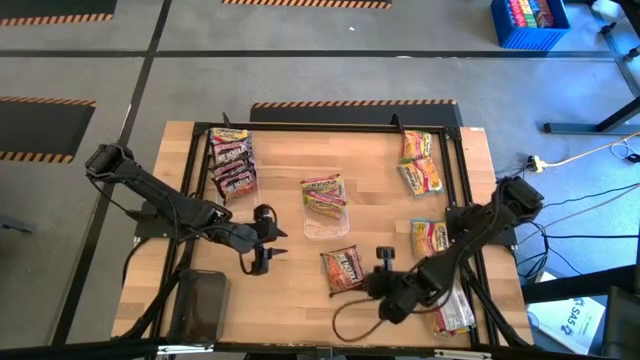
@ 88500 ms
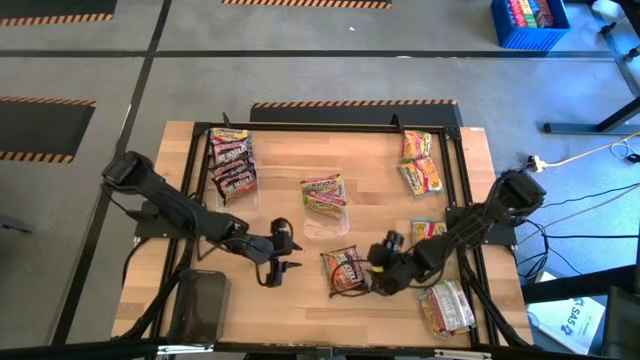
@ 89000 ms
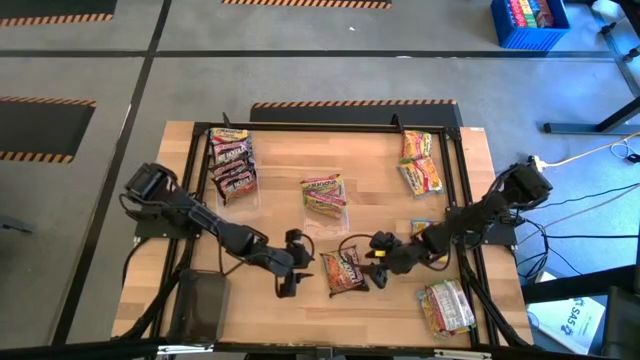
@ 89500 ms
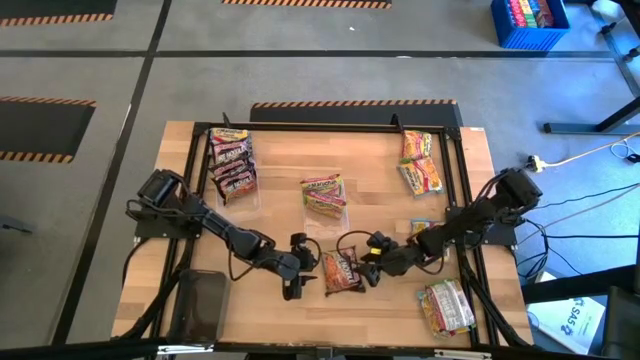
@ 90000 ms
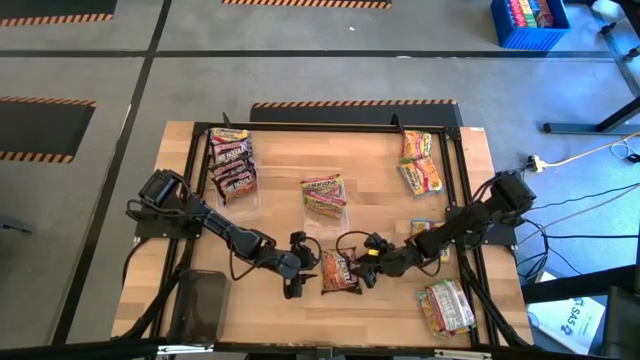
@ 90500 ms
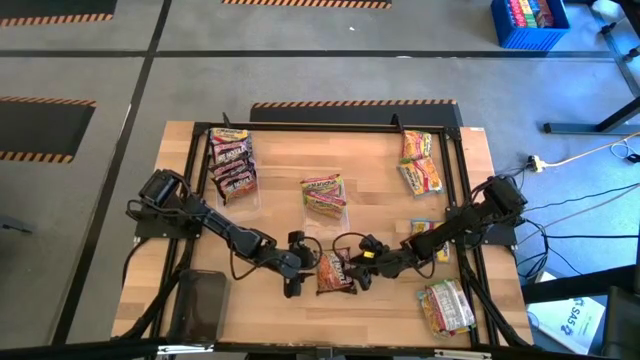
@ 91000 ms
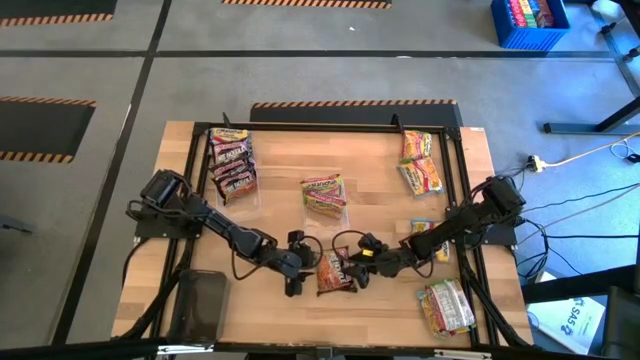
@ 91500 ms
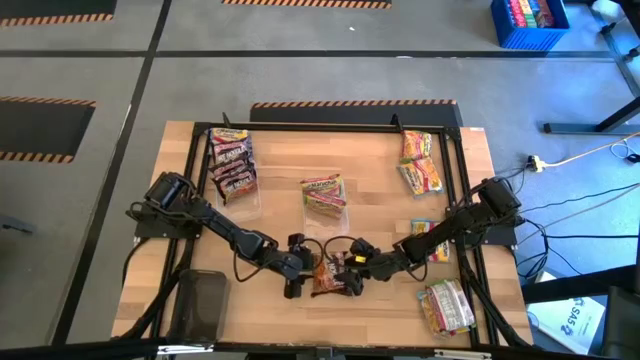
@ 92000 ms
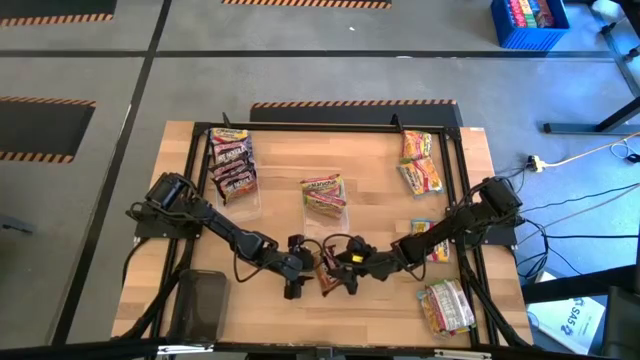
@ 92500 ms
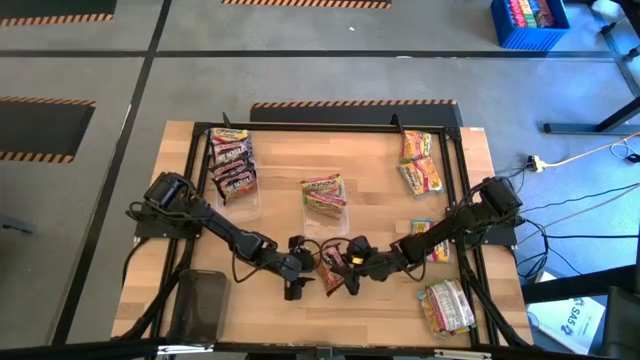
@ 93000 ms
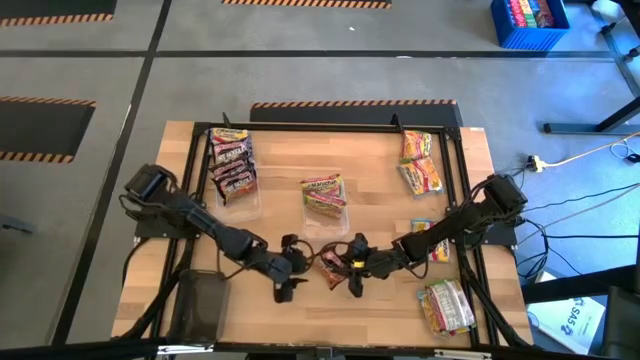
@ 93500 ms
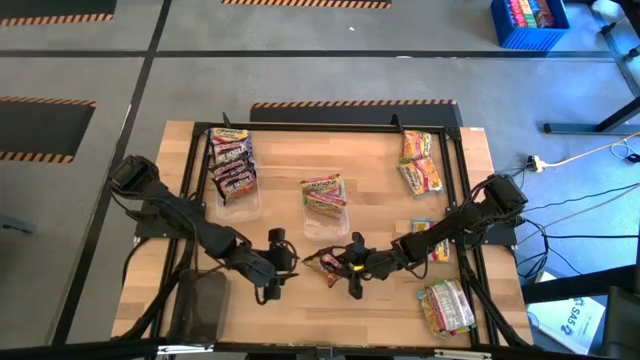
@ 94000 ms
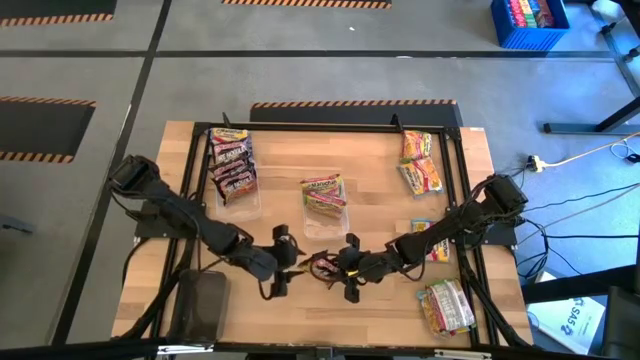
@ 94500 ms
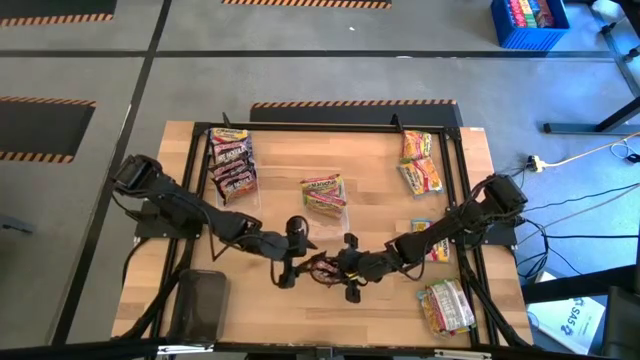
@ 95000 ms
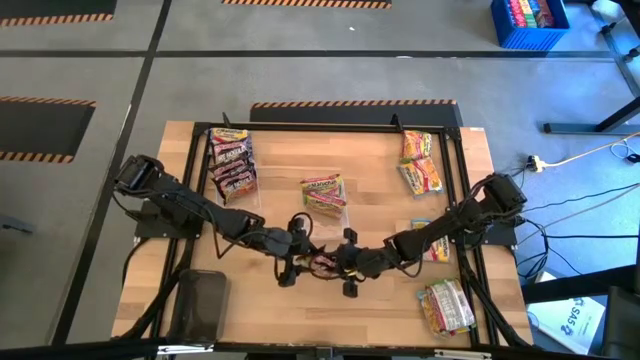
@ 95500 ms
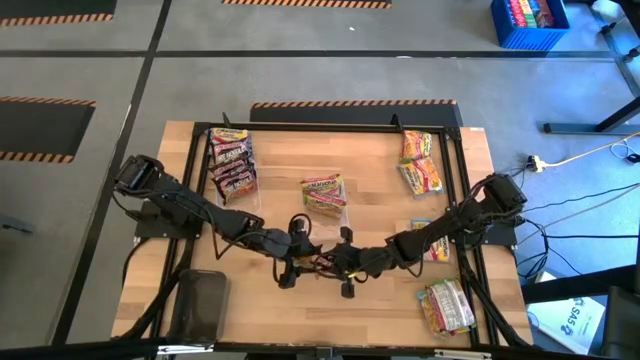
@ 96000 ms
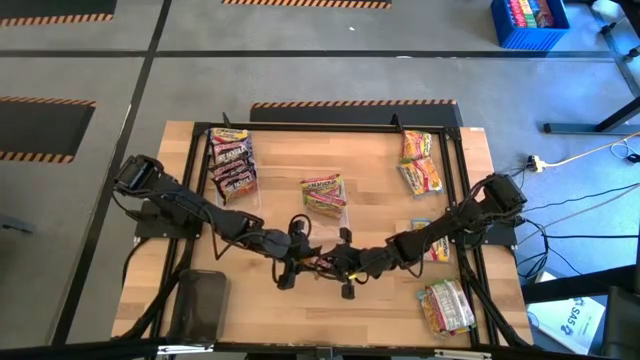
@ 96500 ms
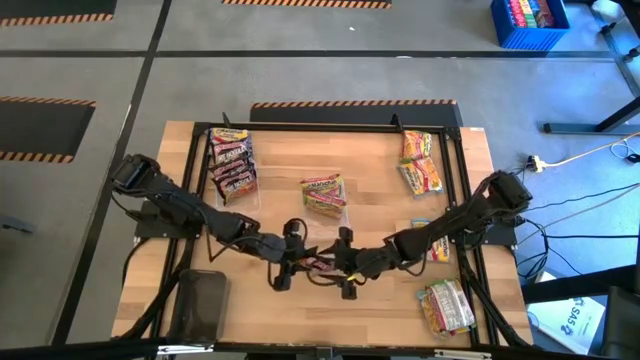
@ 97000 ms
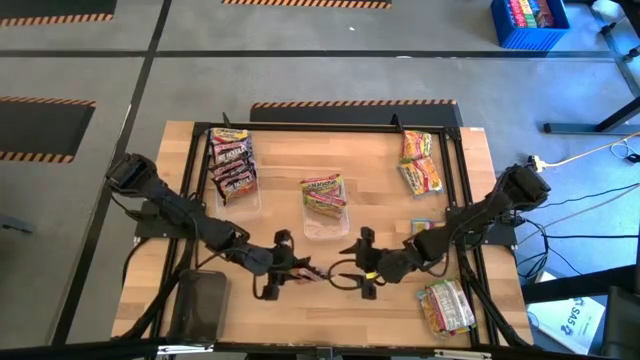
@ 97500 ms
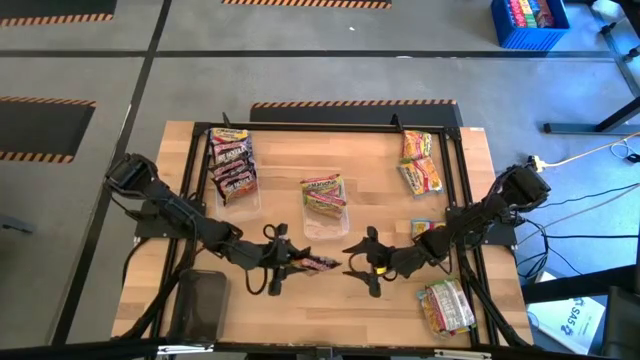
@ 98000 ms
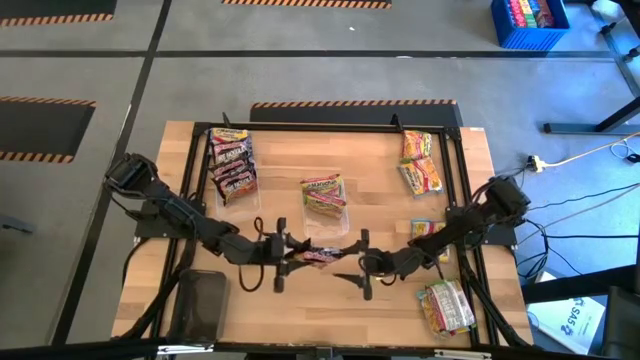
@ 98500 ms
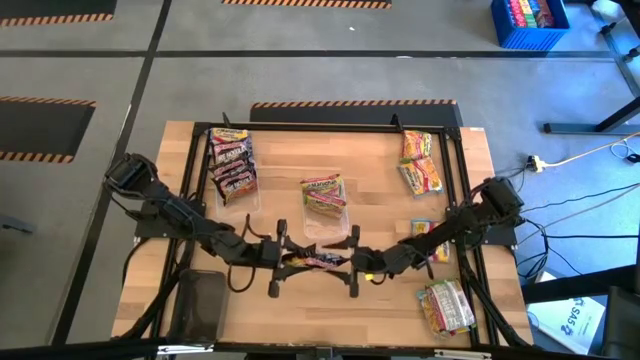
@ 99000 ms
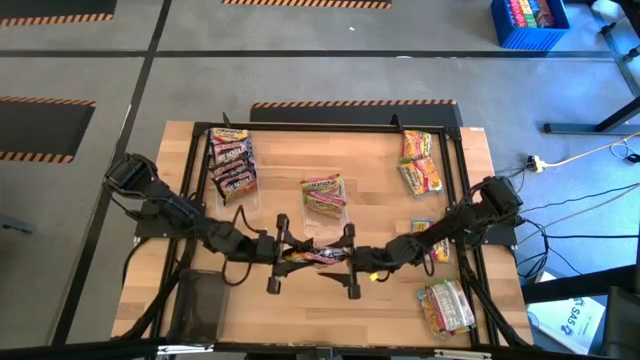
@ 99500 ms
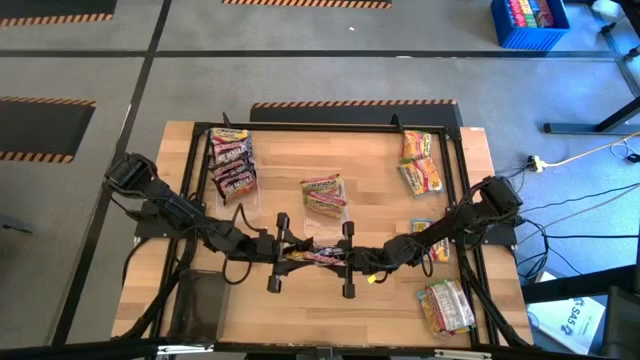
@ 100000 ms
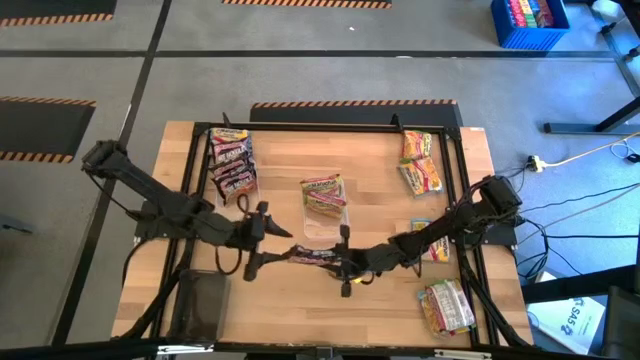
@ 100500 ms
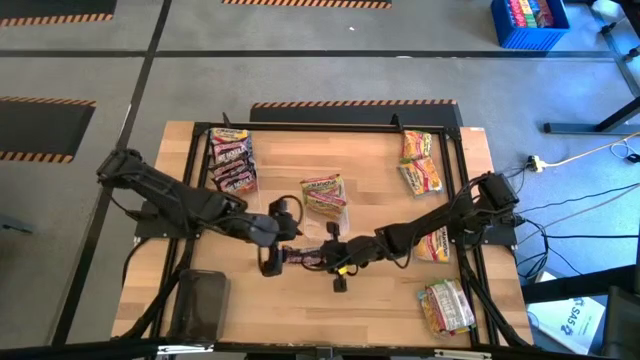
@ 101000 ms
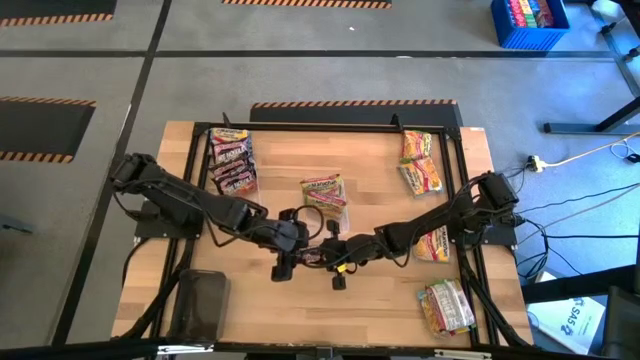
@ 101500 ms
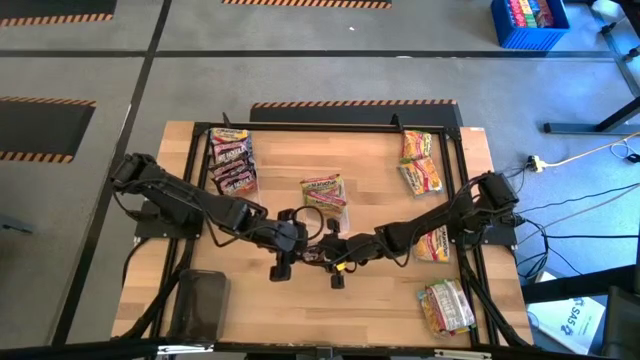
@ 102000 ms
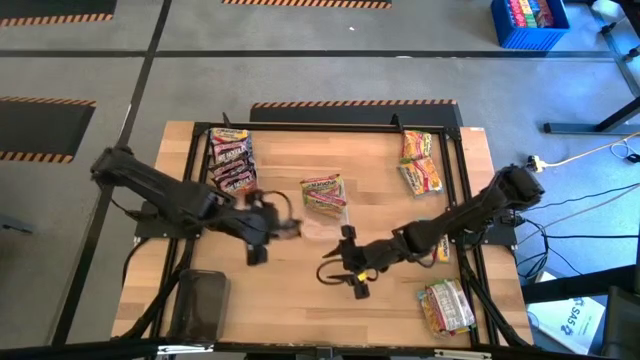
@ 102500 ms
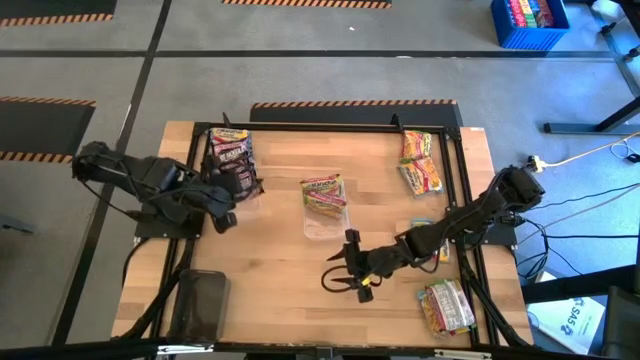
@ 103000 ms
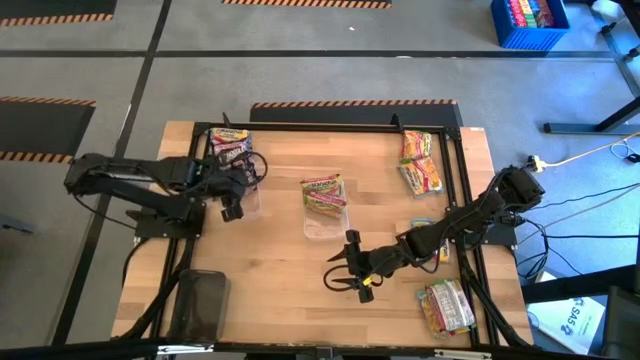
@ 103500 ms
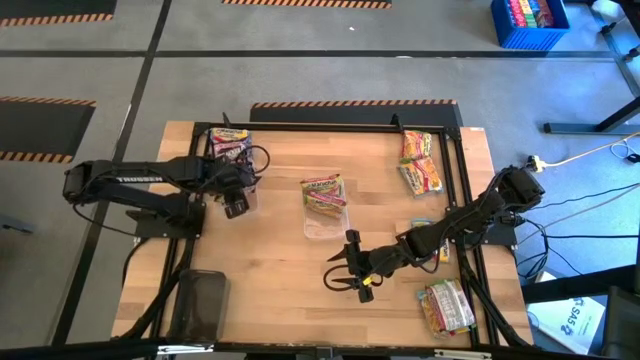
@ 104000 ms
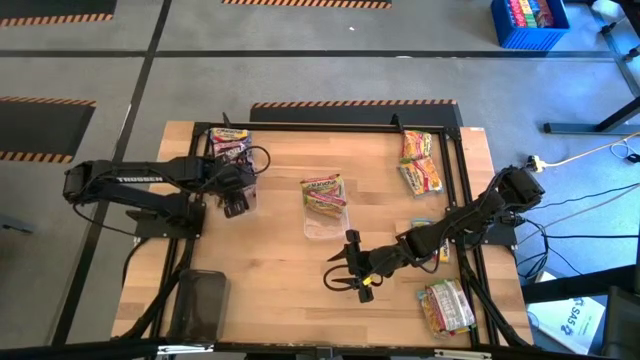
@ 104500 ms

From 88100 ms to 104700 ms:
Task: Sort Maruchan noodles
Put the black noodle pack into the left transparent bin

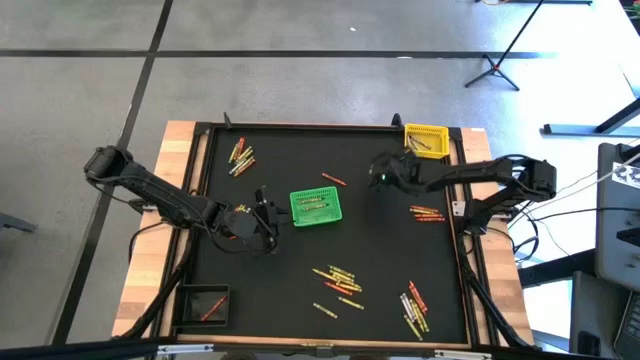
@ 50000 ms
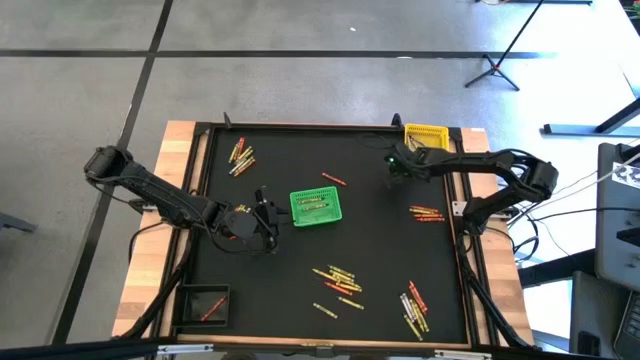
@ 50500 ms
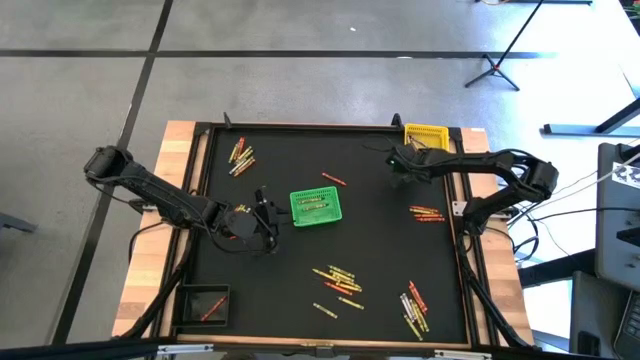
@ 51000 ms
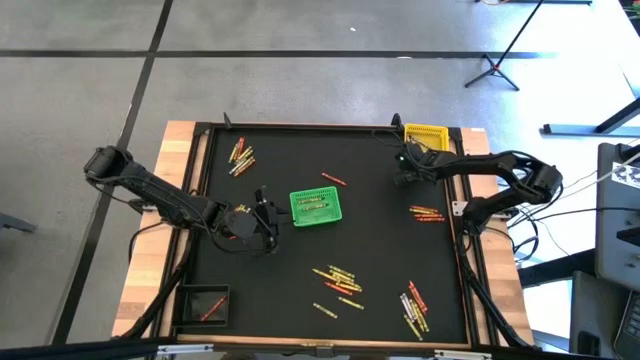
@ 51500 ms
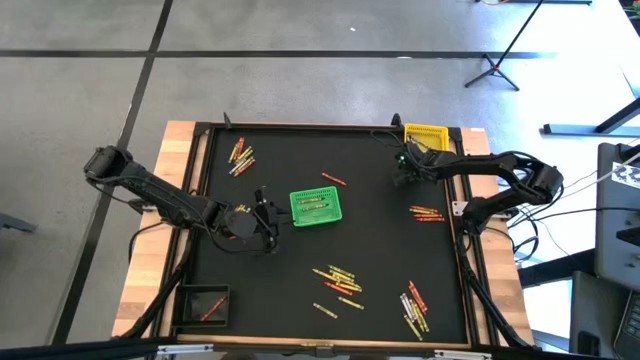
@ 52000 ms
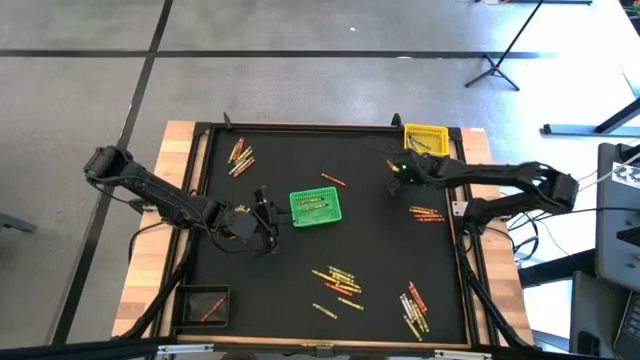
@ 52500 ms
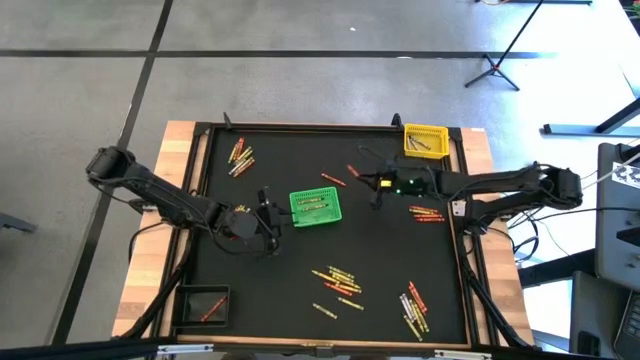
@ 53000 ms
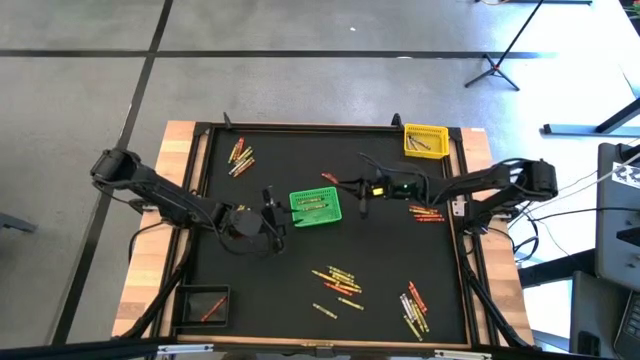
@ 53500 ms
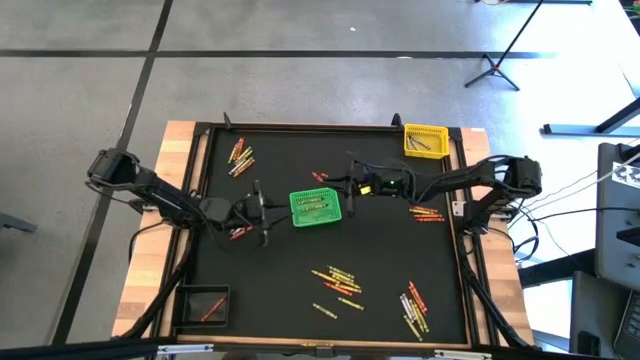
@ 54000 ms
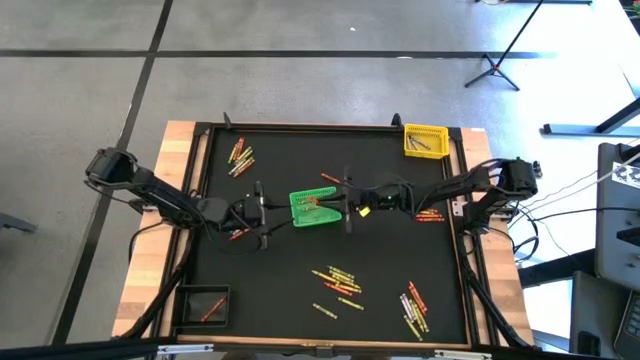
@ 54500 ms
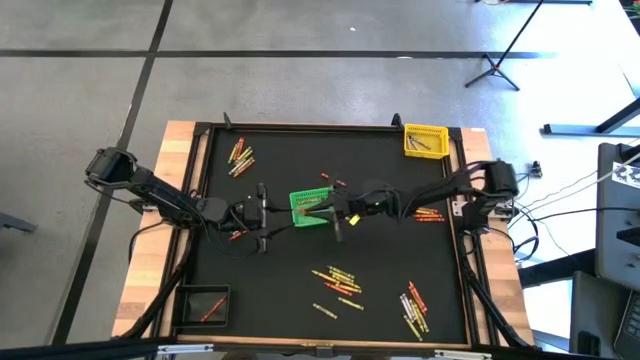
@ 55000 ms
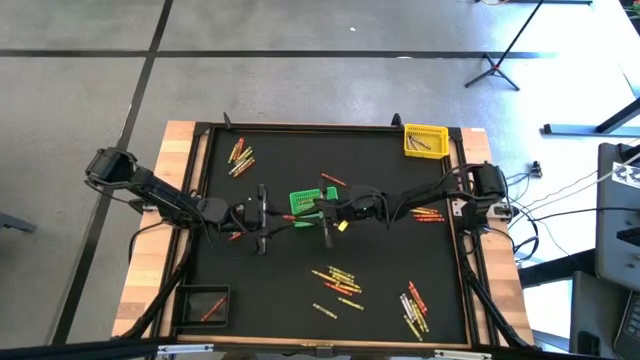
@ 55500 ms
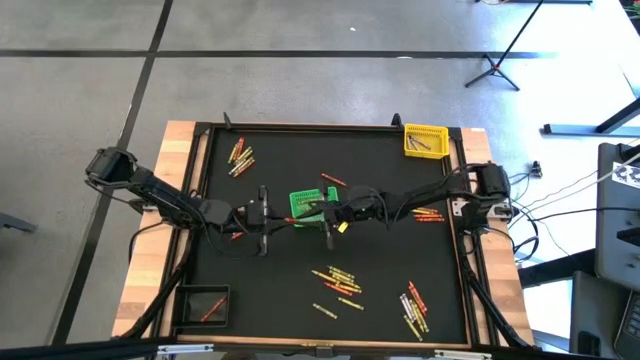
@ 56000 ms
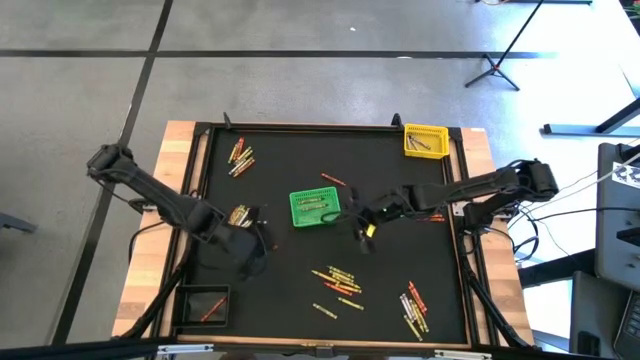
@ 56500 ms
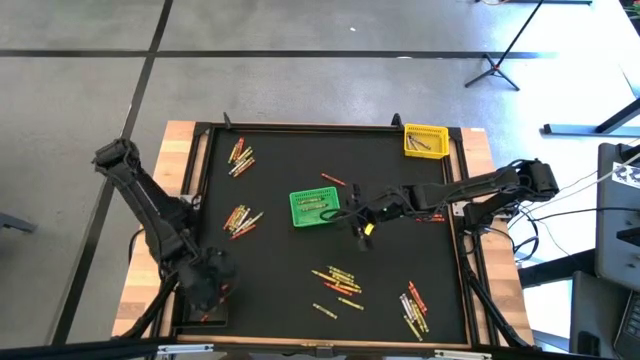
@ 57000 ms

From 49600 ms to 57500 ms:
Task: Sort crayons
Put the orange crayon into the black bin
